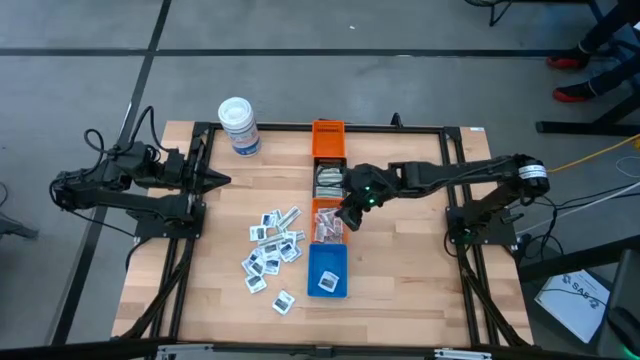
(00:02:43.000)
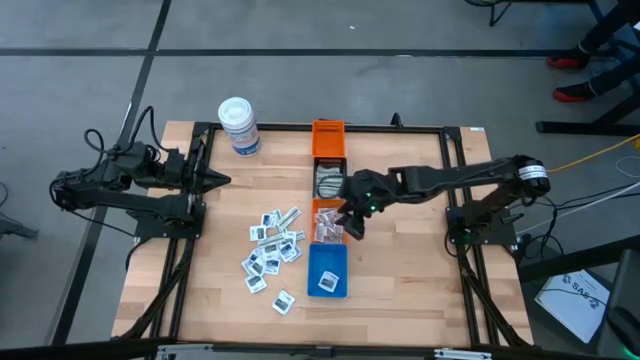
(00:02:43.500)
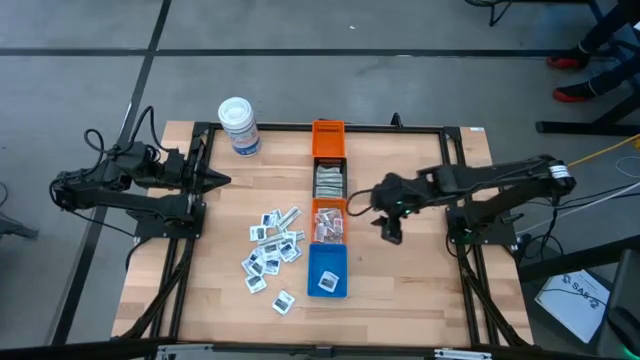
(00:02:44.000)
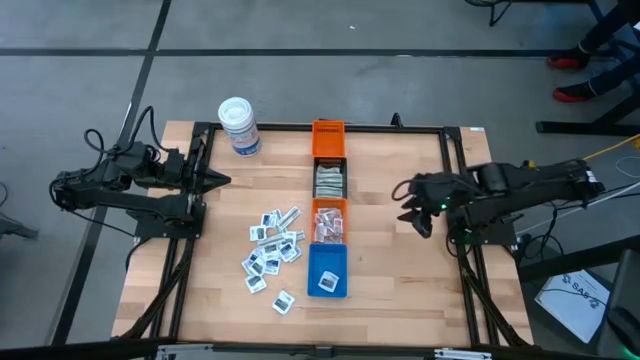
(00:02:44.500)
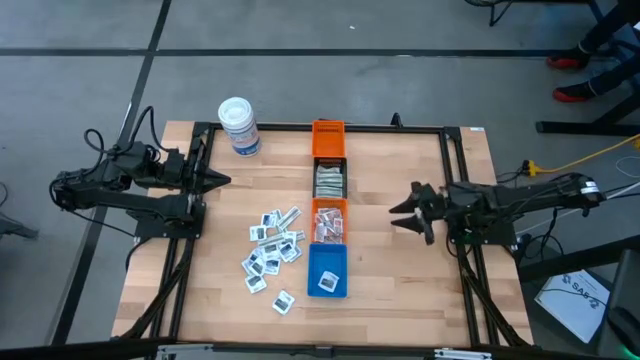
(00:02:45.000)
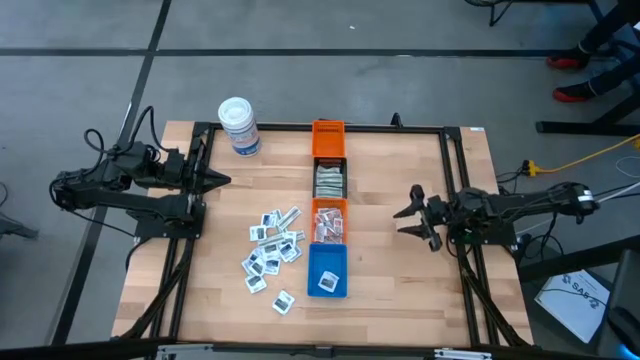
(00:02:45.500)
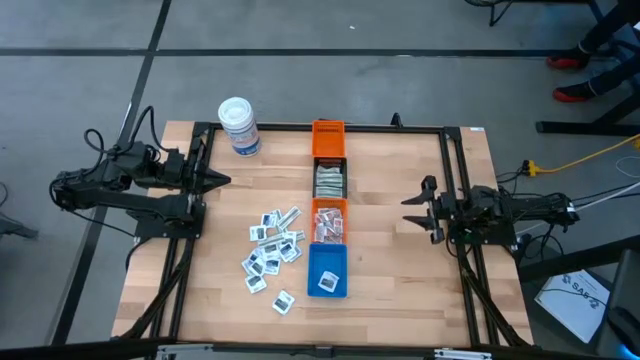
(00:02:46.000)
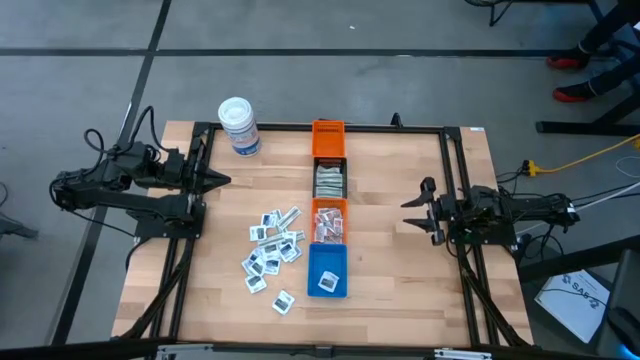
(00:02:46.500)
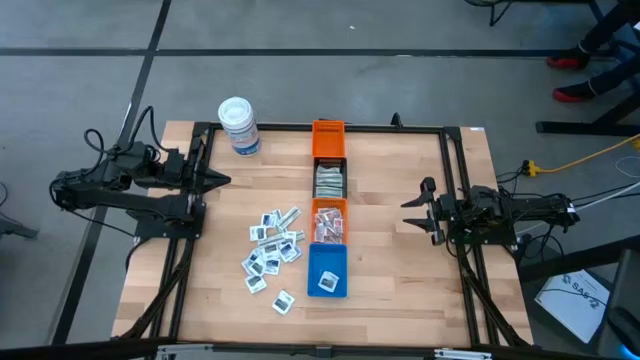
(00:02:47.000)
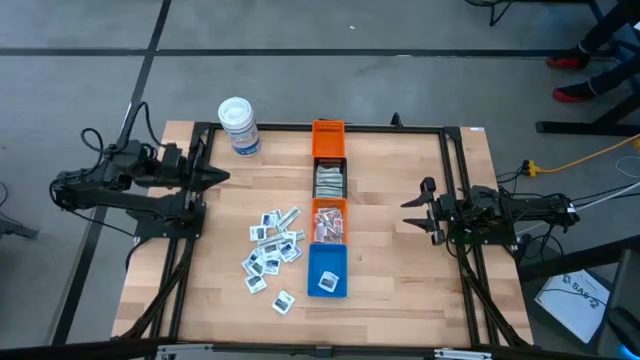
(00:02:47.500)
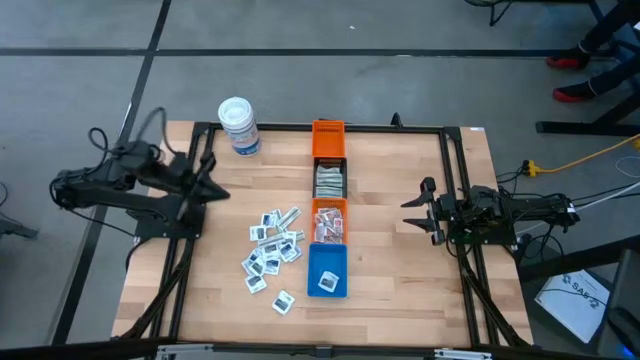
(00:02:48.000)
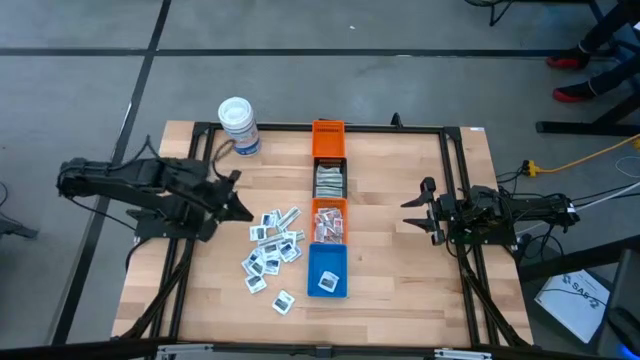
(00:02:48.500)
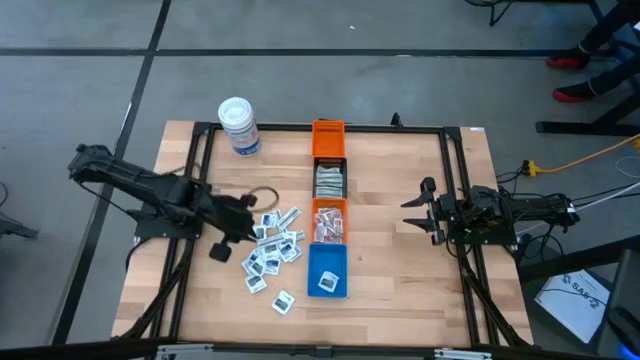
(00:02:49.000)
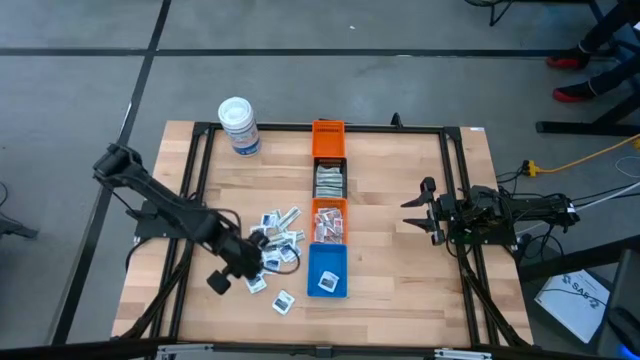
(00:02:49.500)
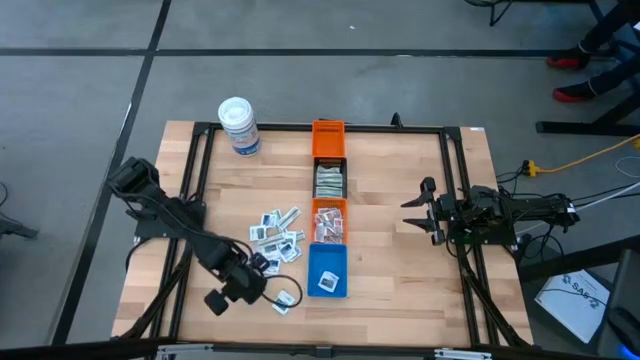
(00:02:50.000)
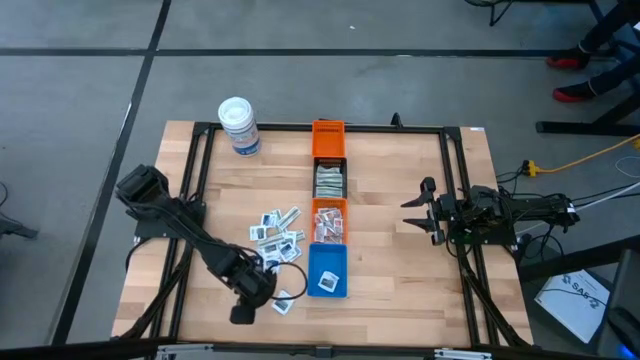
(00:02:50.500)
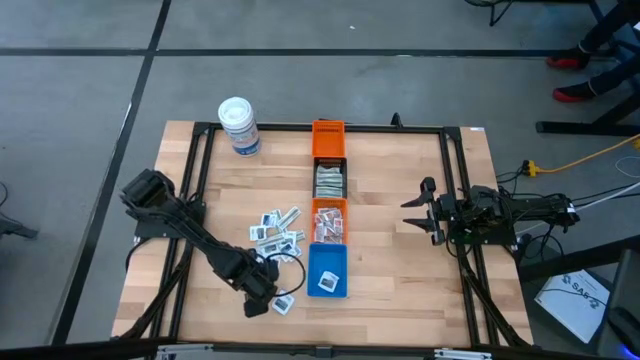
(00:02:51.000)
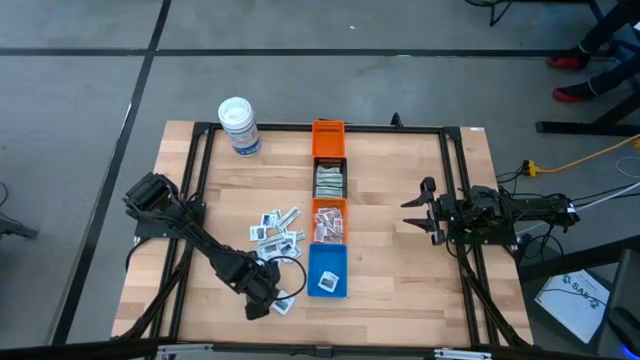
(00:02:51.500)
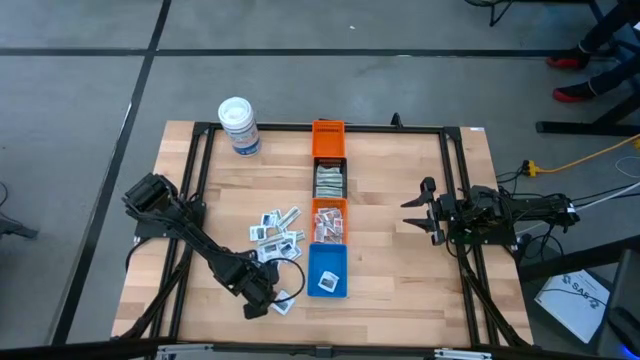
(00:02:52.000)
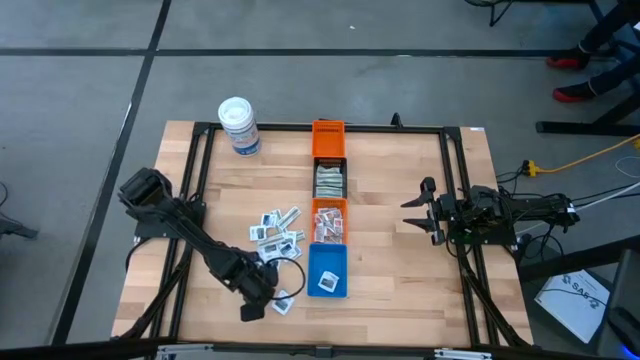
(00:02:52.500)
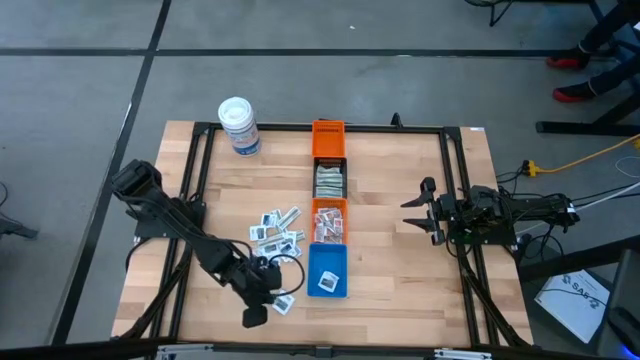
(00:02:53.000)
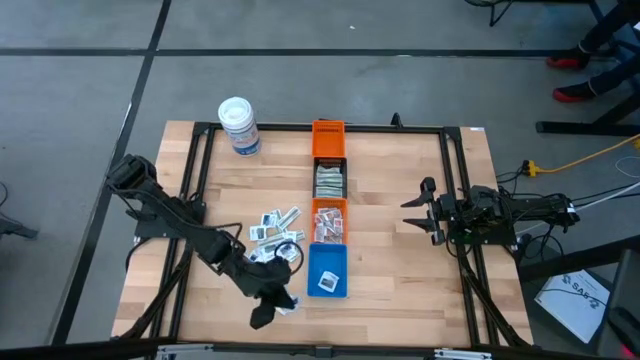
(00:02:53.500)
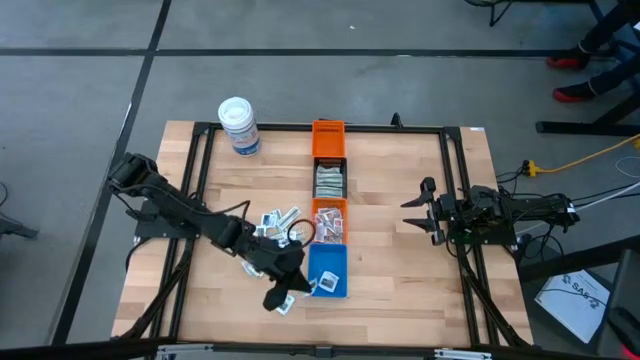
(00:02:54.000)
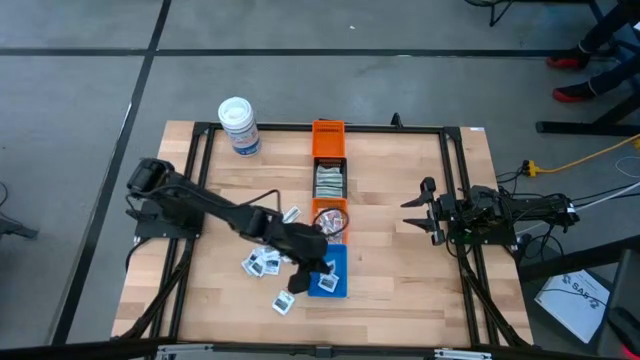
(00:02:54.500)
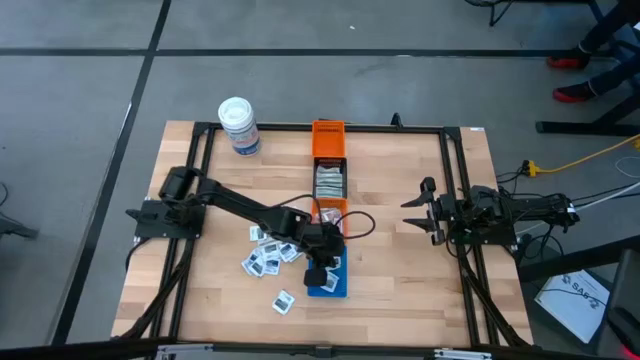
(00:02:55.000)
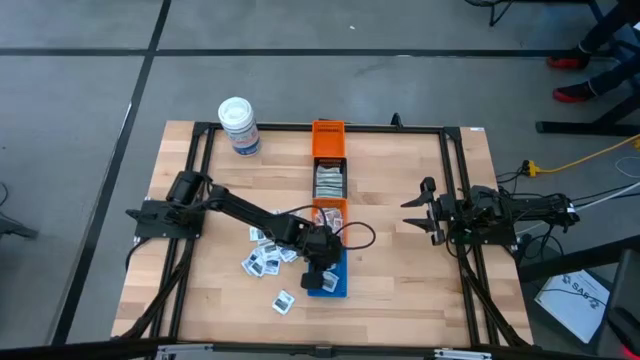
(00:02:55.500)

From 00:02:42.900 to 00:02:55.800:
Task: Pick & Place First Aid Supplies
Put the gray towelette pack into the blue bin

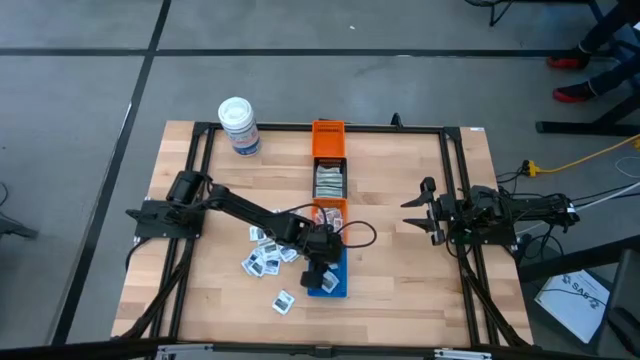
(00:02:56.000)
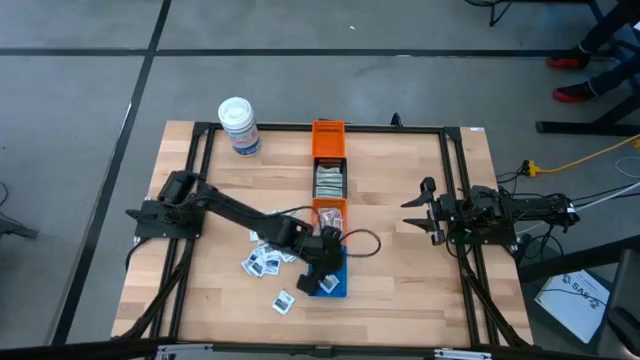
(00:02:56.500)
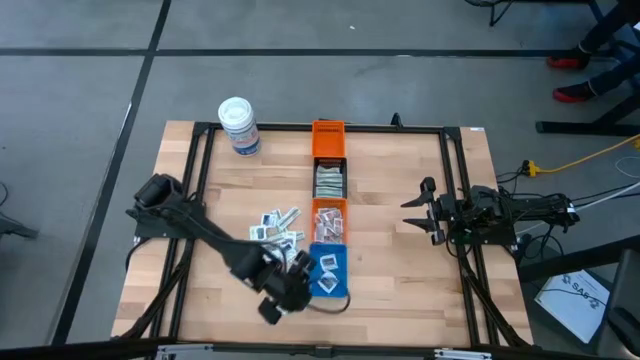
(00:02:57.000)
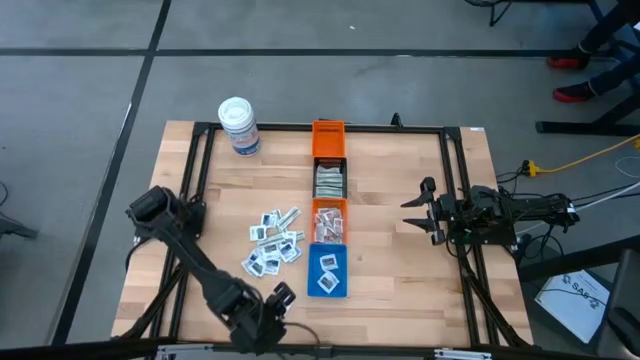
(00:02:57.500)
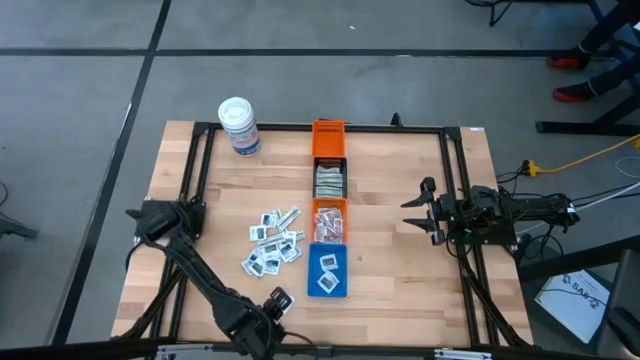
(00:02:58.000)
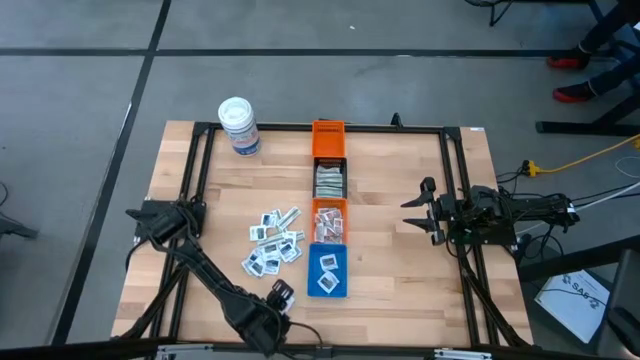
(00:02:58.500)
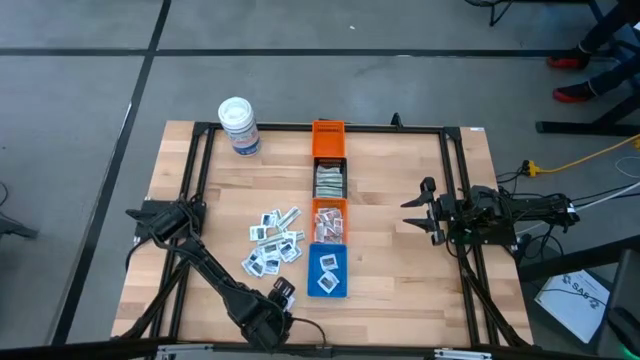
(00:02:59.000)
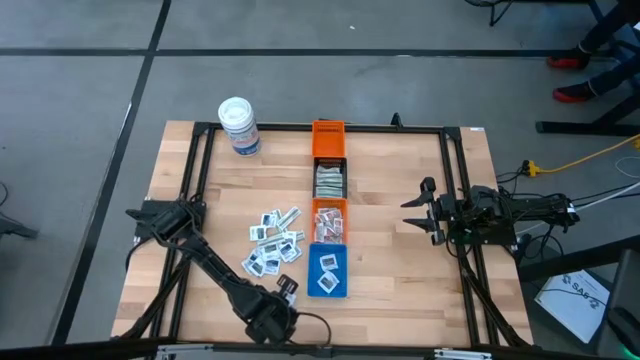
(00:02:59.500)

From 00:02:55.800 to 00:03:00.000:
Put the gray towelette pack into the blue bin

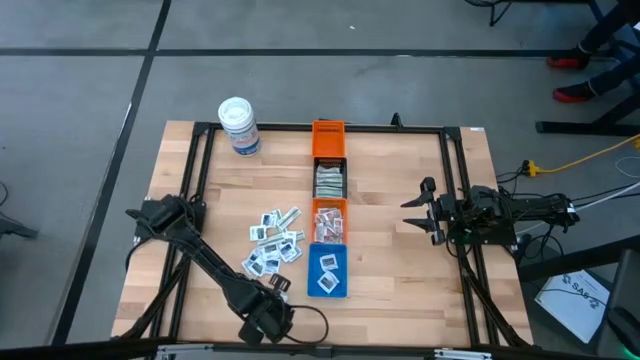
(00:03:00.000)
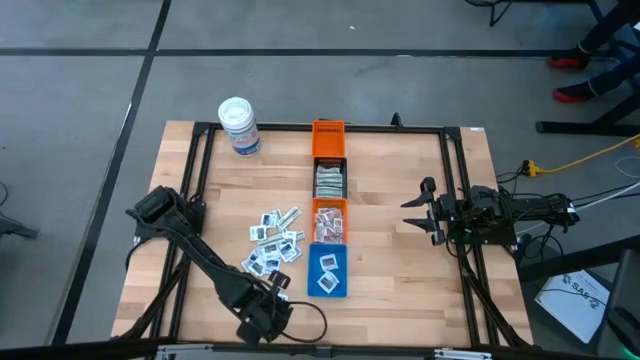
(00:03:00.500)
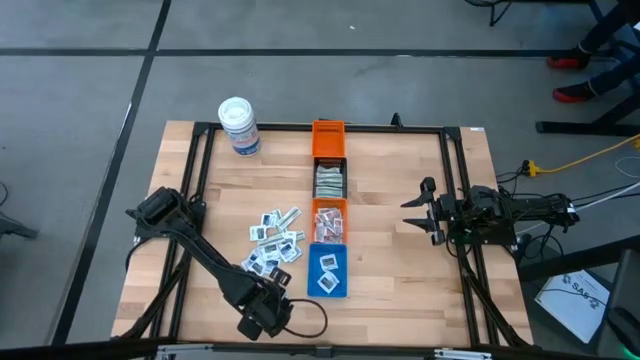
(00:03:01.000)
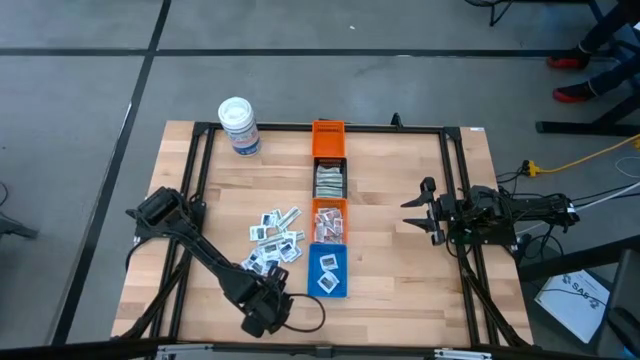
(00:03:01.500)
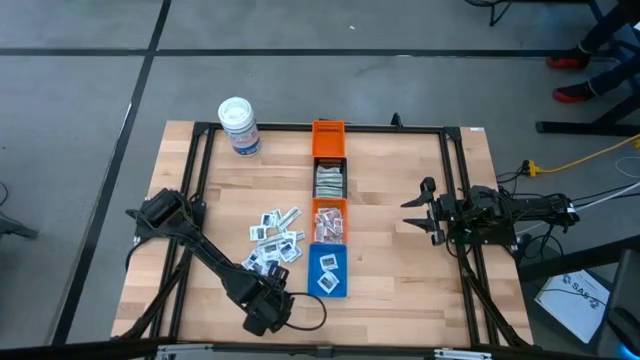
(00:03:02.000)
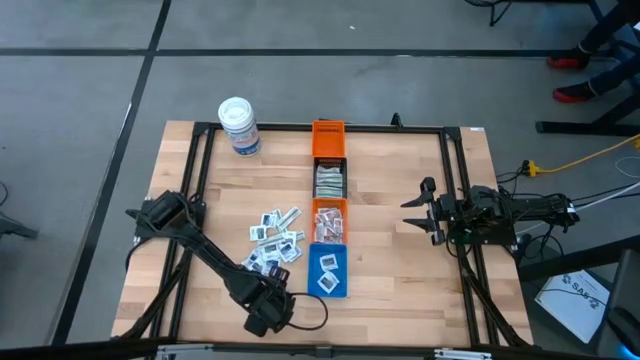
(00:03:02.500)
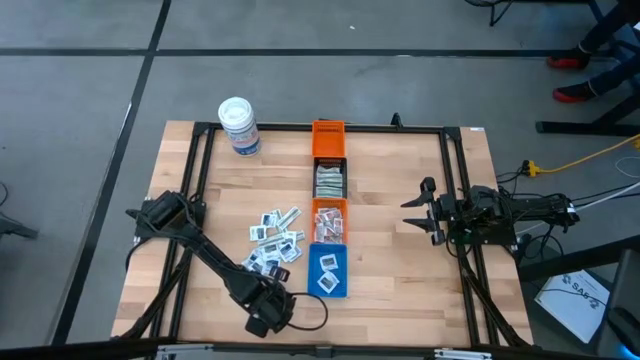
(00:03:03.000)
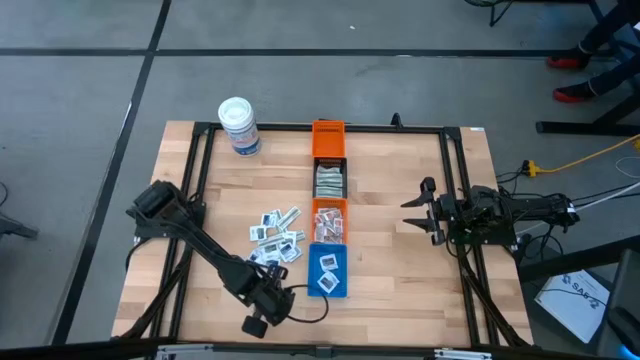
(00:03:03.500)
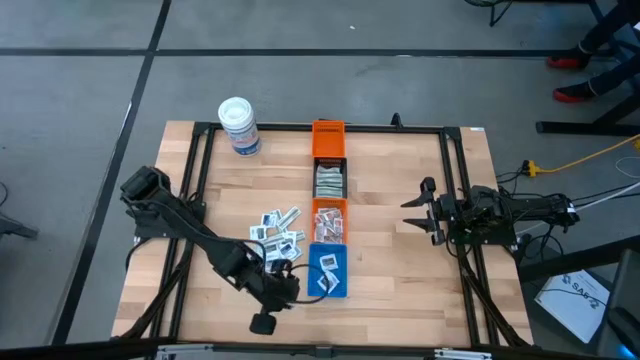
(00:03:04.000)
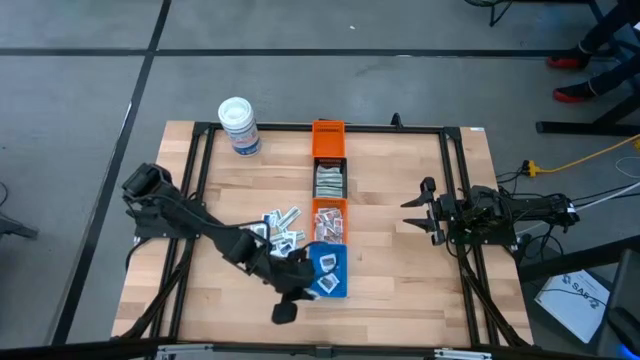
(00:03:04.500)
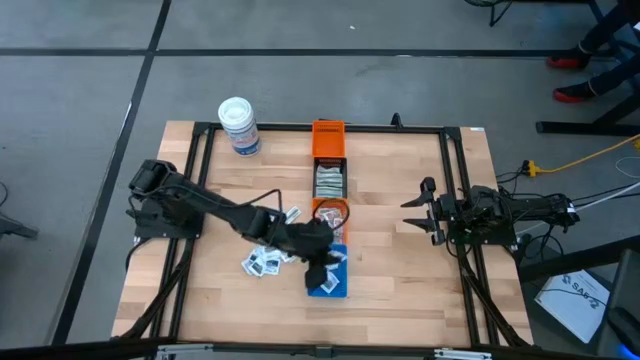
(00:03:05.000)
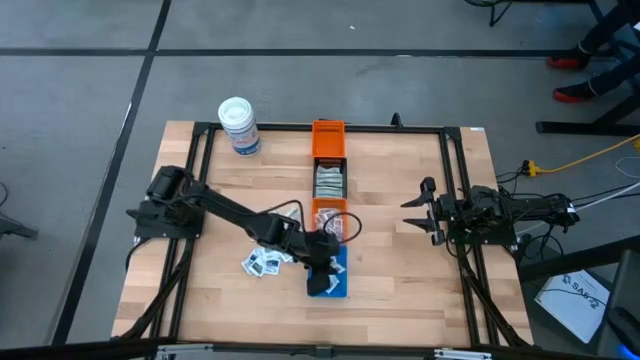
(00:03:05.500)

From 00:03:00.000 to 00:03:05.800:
Put the gray towelette pack into the blue bin
